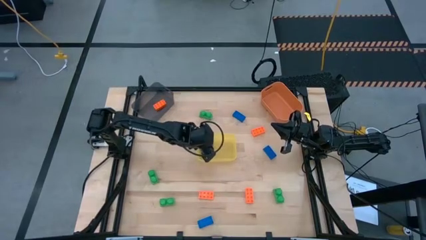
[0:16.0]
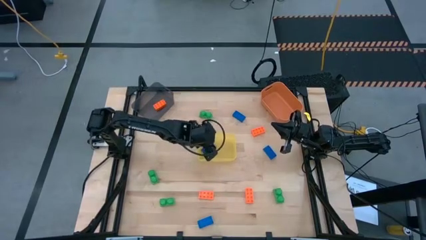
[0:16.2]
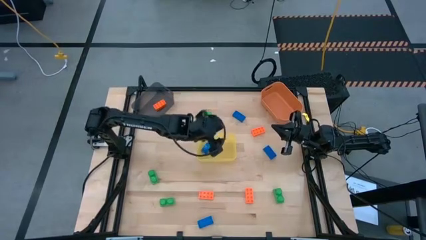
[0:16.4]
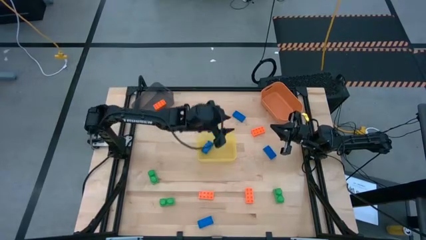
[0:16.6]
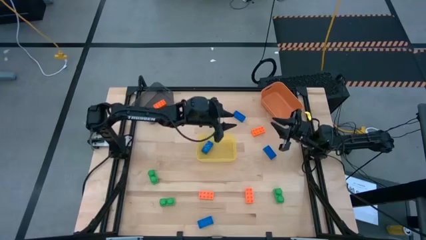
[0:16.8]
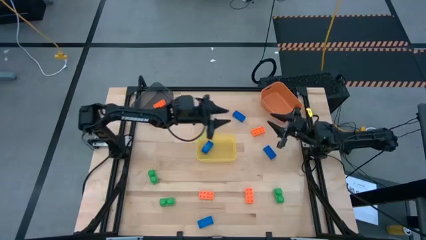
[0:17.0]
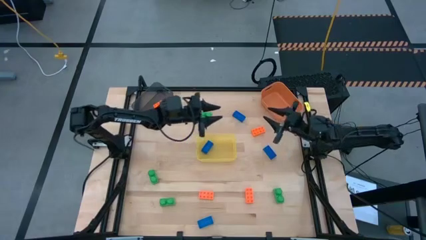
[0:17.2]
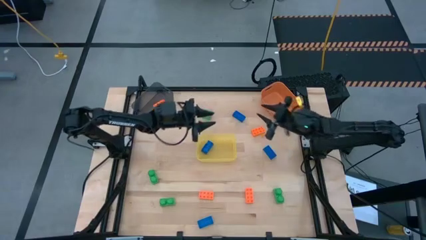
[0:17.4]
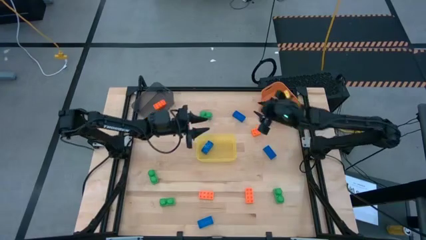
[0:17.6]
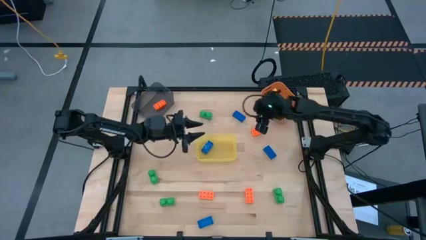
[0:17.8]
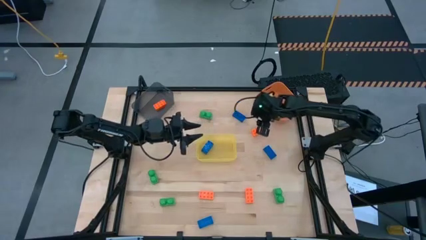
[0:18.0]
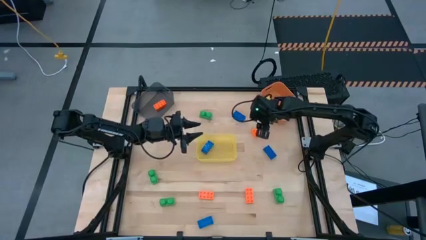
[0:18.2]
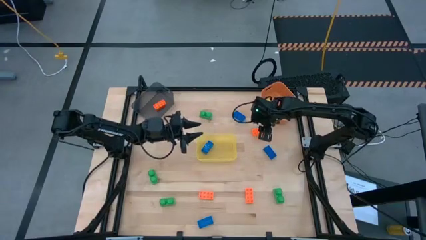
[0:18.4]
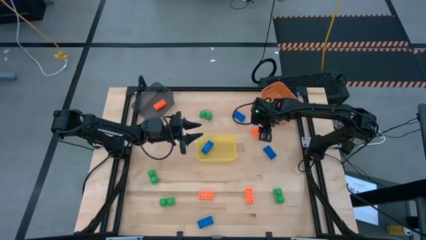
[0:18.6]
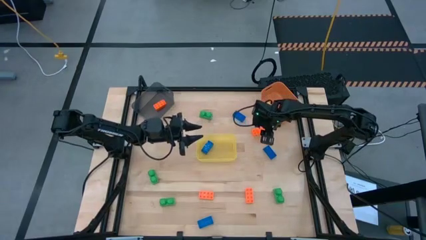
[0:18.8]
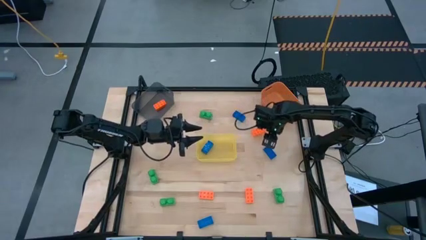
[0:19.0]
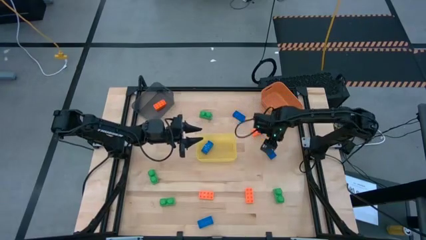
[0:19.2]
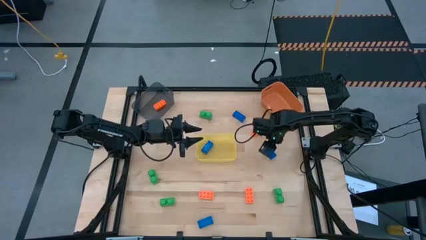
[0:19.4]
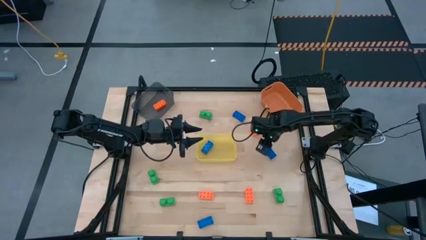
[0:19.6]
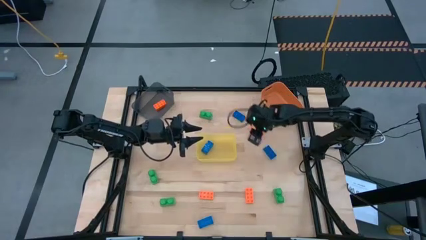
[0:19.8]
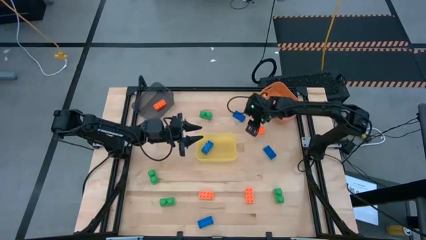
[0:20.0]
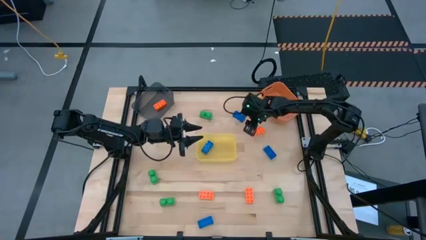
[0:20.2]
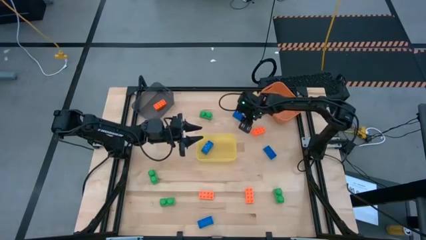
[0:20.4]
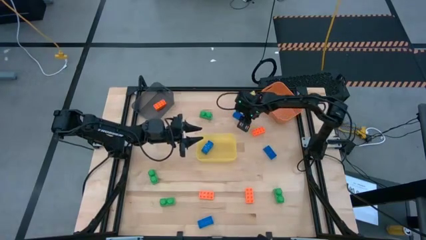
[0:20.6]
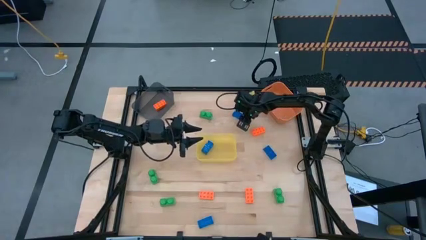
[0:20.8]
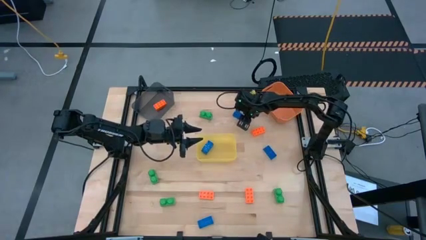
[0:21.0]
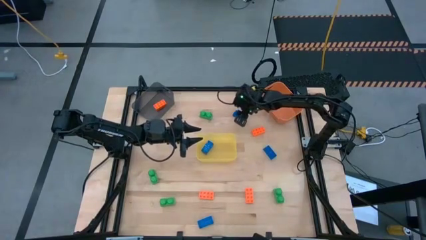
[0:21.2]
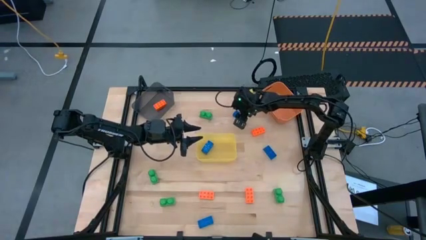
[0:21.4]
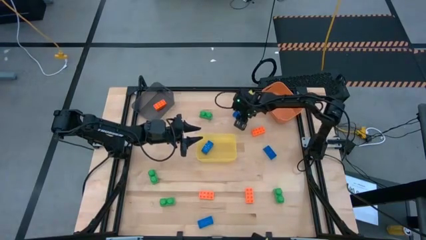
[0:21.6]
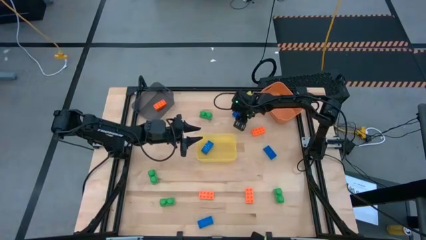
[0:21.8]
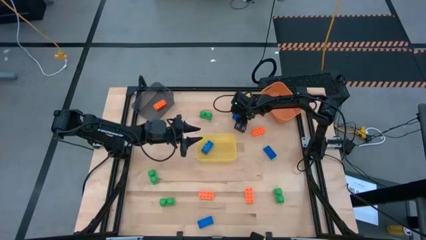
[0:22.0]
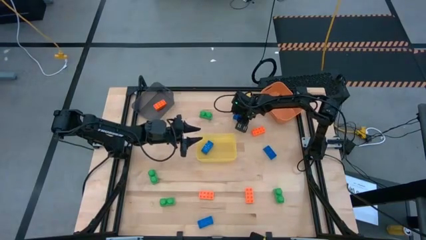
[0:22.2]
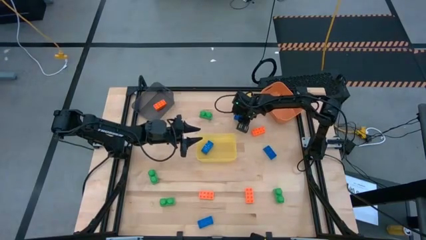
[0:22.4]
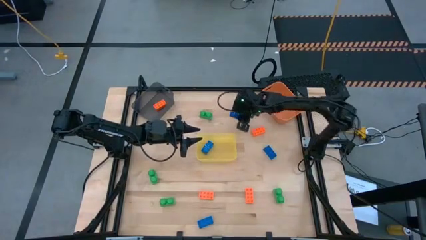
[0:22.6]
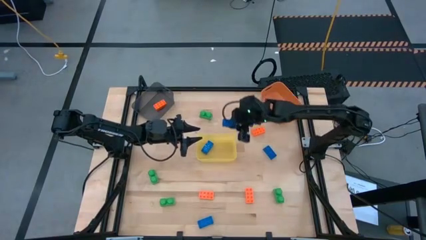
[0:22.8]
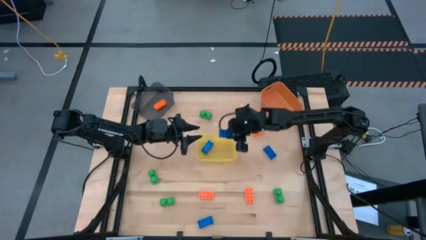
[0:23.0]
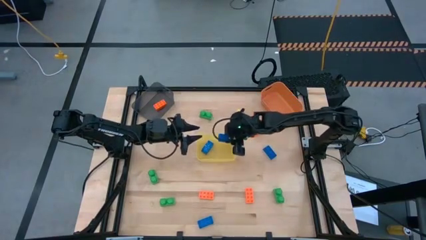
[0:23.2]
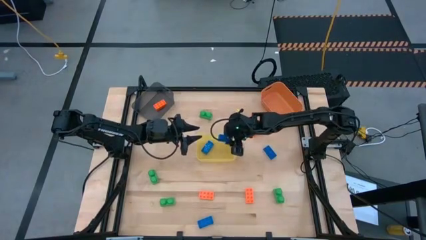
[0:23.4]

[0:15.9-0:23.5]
Task: Sort & place blocks by color
Put the blue game piece into the yellow bin

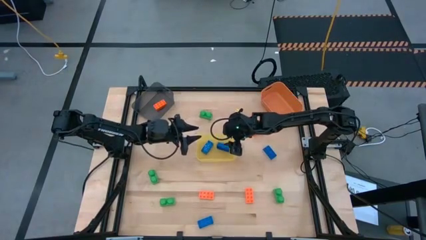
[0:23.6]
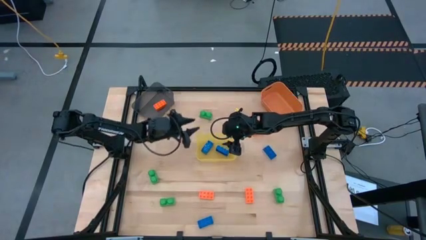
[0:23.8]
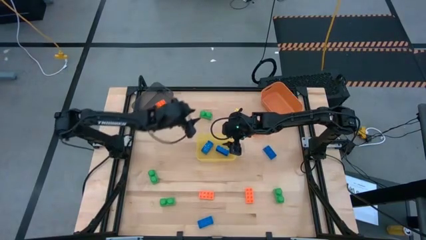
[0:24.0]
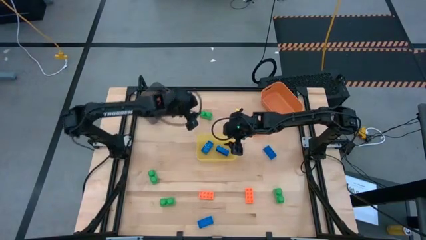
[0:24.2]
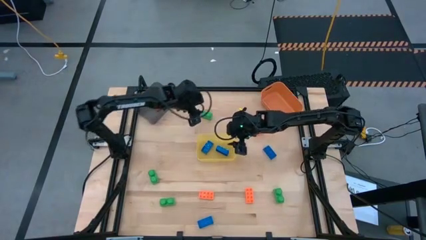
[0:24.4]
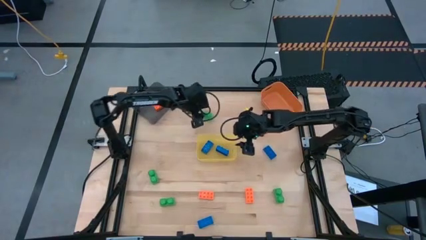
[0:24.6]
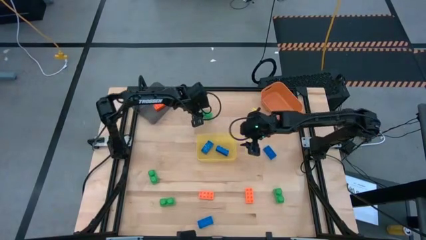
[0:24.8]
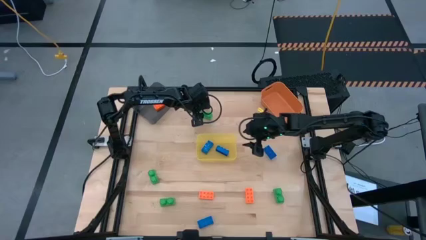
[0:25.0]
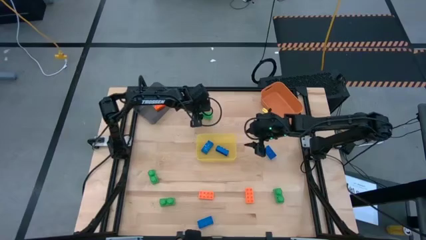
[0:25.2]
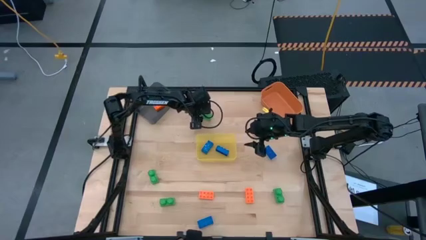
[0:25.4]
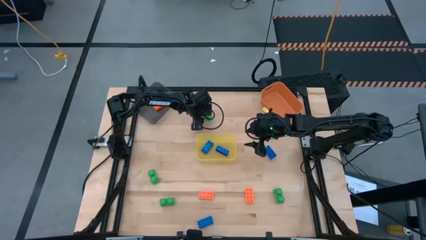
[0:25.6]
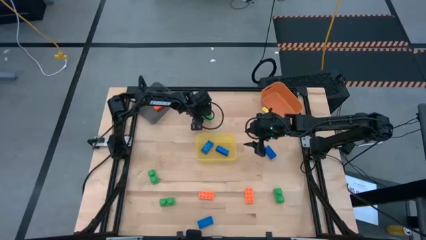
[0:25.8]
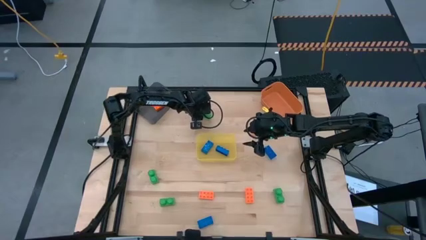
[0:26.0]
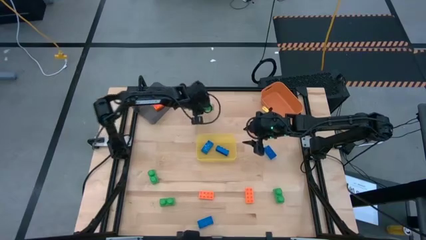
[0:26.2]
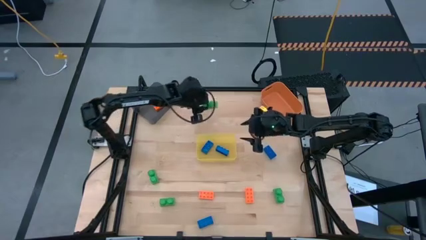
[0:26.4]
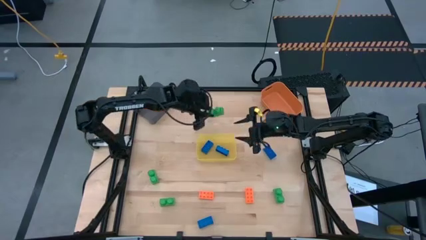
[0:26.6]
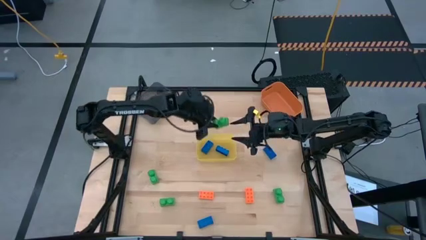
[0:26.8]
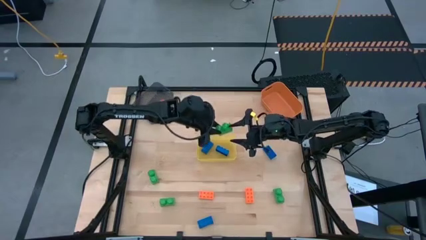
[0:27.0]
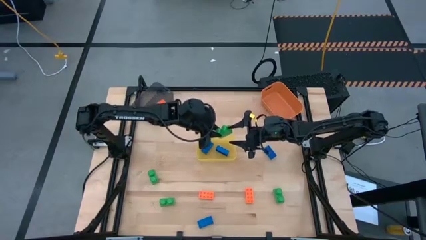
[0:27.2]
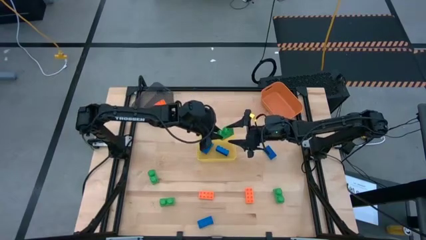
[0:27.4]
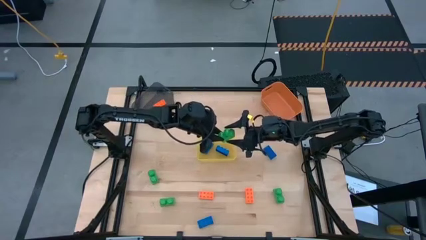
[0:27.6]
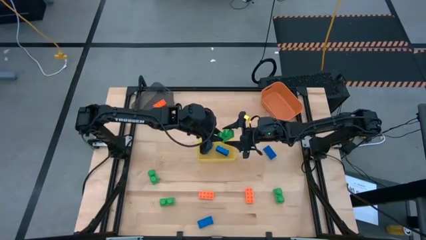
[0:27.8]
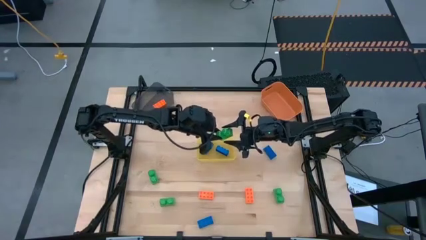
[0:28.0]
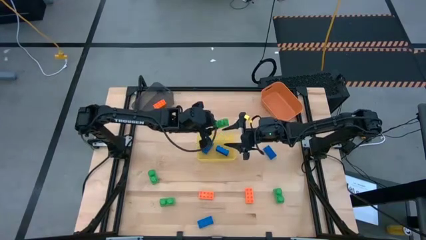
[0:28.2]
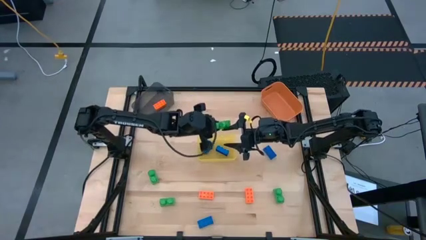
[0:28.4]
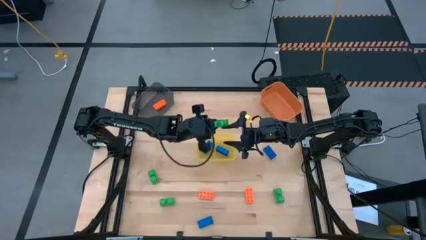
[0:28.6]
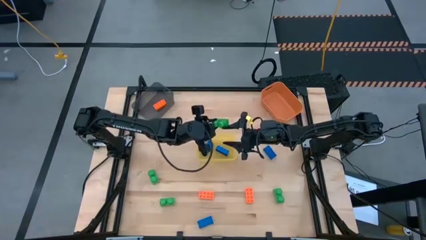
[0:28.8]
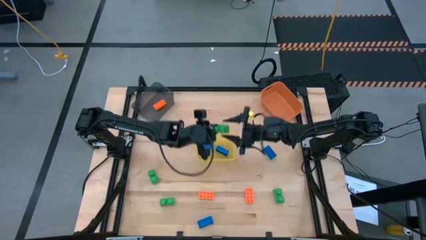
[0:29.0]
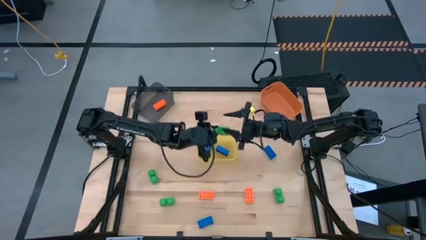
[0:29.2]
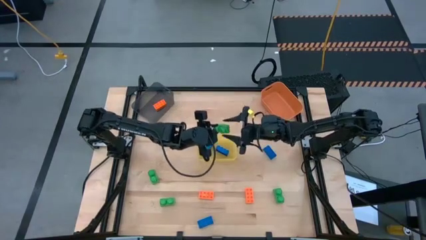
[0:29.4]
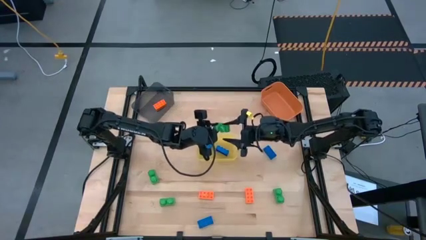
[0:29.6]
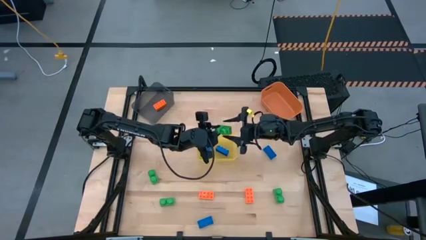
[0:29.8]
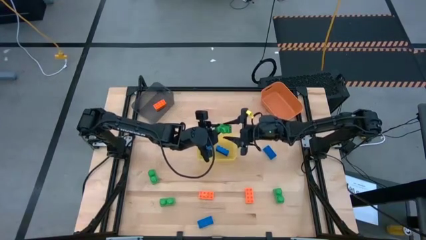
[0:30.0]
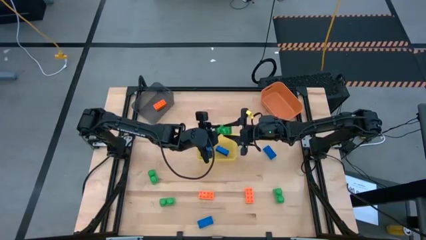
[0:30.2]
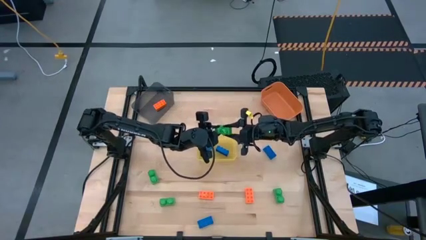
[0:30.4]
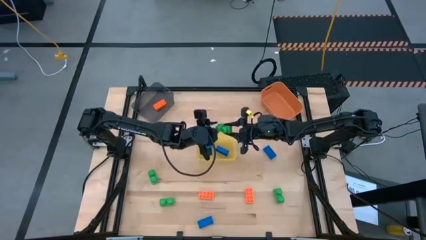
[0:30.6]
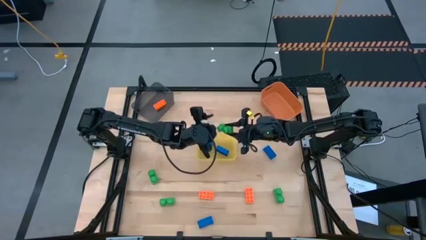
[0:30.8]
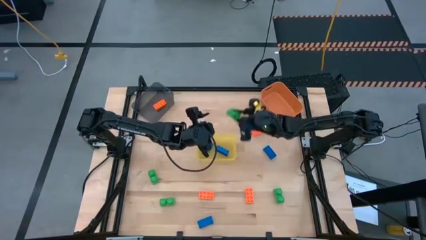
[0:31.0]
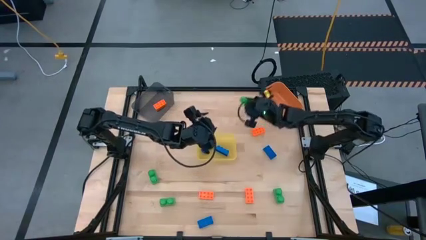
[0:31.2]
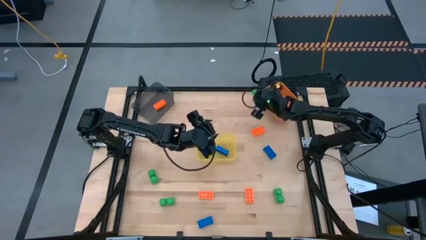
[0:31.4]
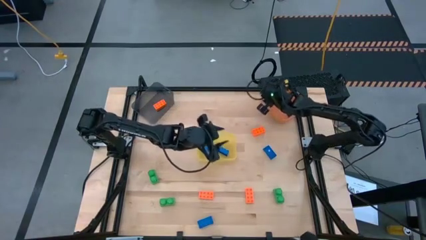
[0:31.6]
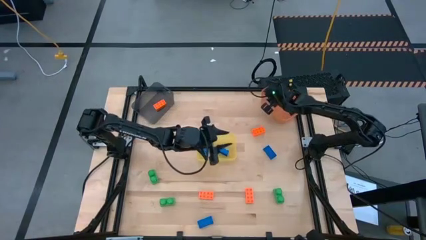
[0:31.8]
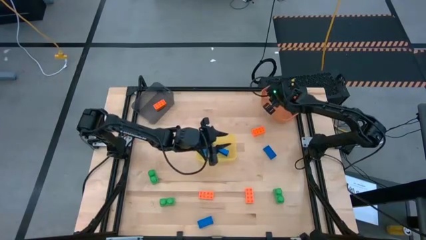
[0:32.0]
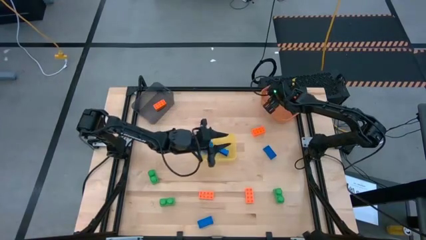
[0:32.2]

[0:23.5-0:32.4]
Put the green game piece into the orange bin
